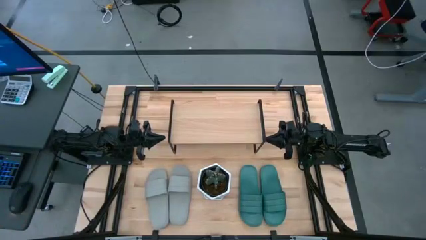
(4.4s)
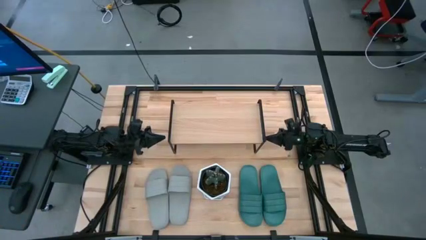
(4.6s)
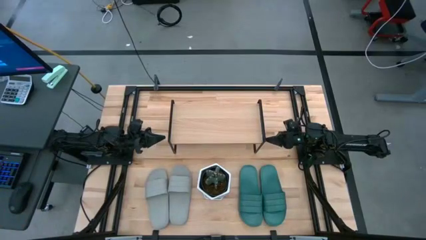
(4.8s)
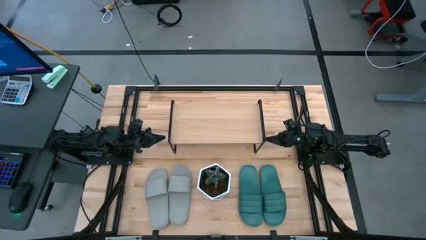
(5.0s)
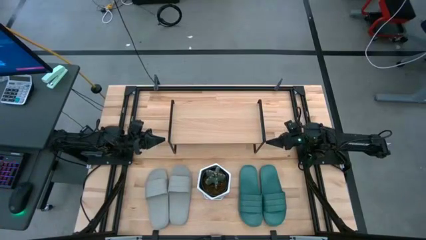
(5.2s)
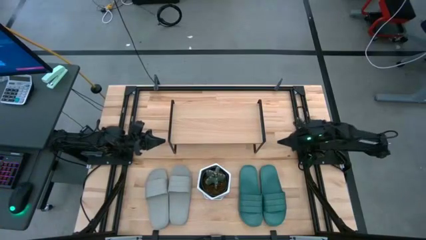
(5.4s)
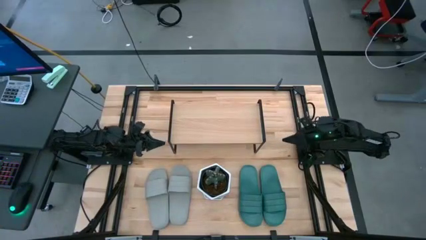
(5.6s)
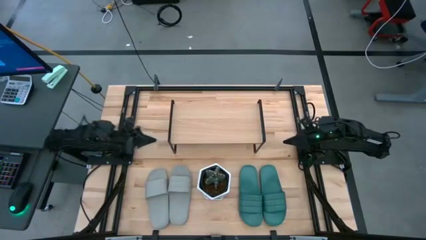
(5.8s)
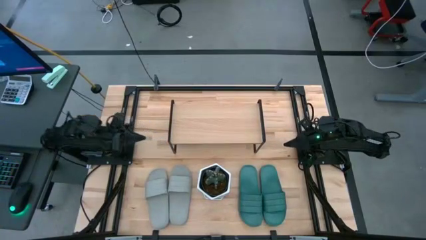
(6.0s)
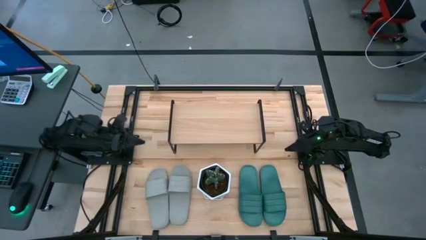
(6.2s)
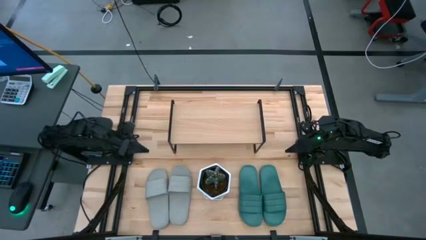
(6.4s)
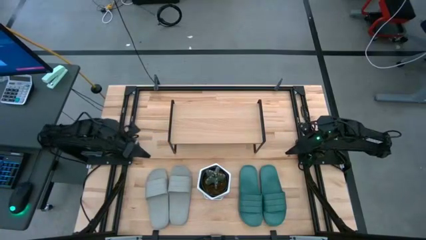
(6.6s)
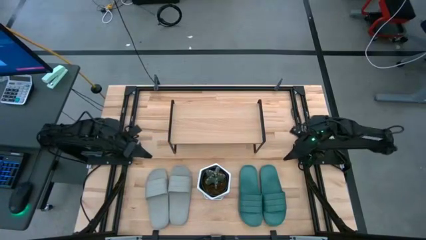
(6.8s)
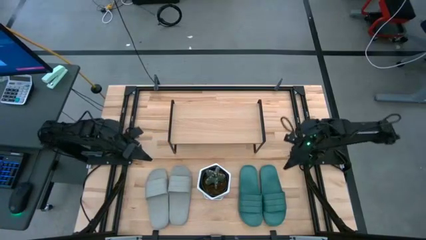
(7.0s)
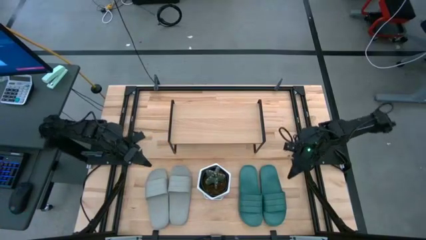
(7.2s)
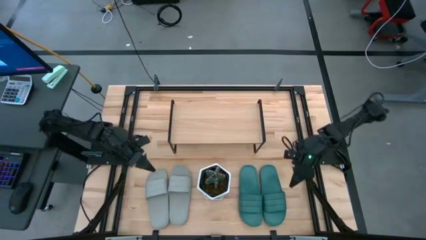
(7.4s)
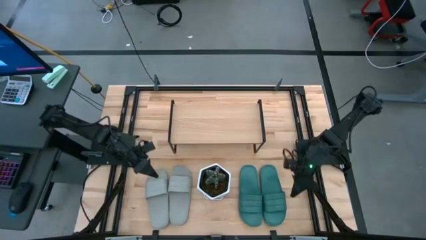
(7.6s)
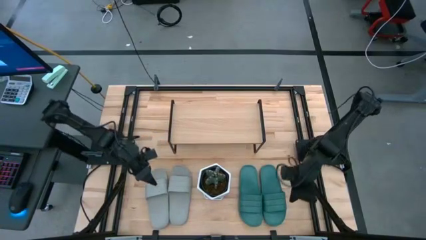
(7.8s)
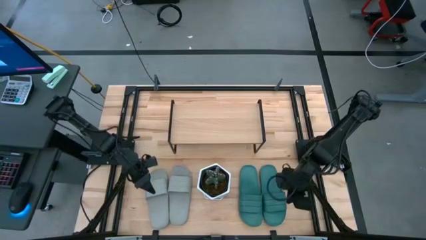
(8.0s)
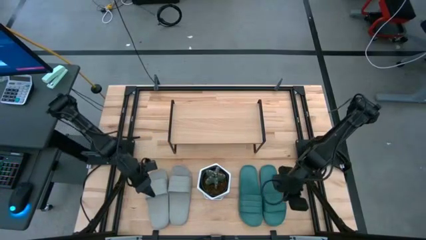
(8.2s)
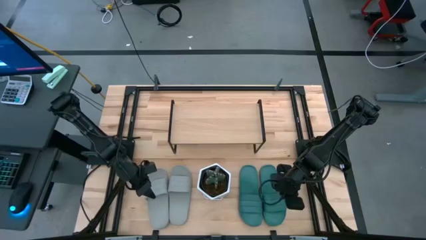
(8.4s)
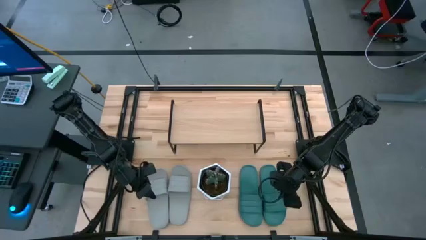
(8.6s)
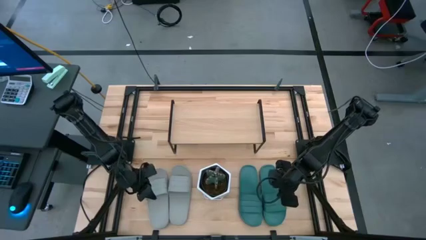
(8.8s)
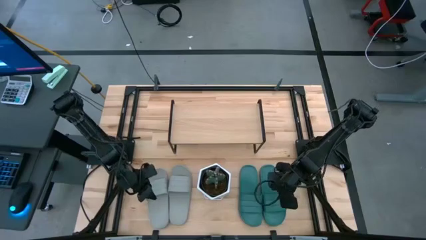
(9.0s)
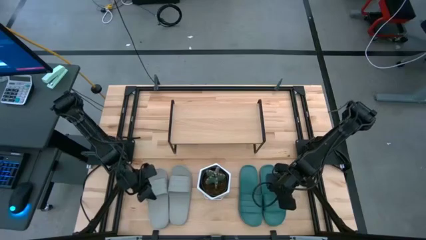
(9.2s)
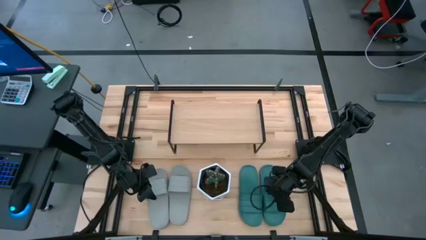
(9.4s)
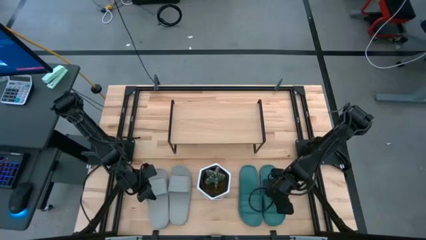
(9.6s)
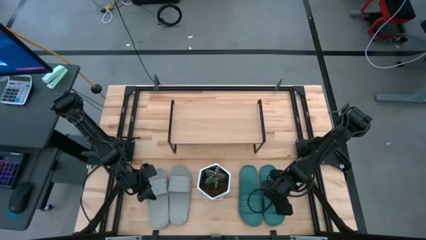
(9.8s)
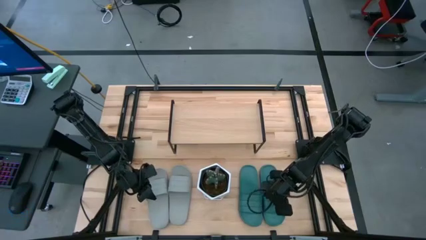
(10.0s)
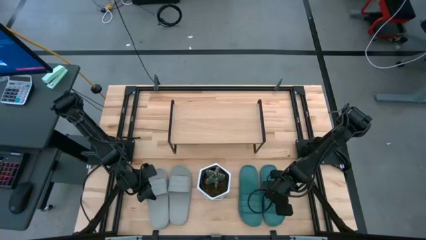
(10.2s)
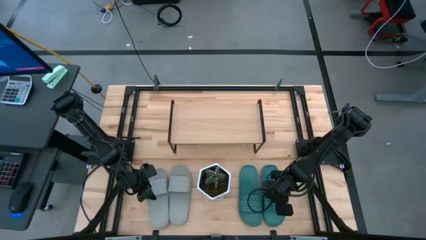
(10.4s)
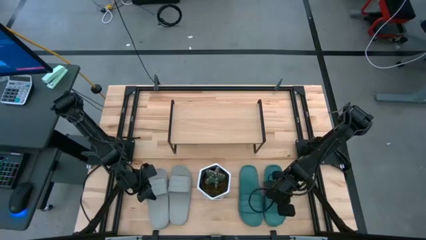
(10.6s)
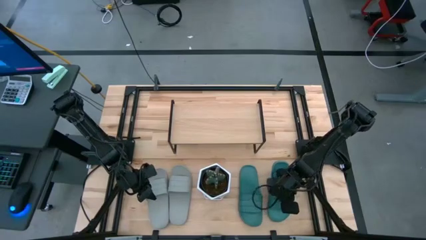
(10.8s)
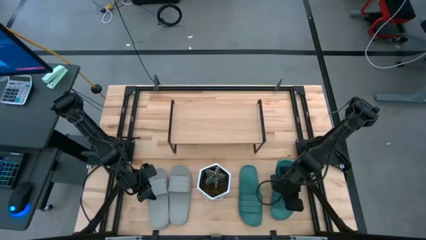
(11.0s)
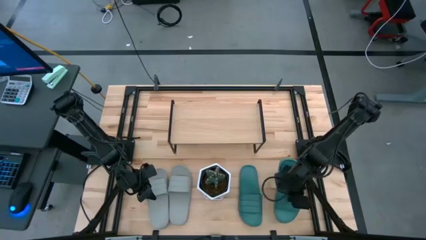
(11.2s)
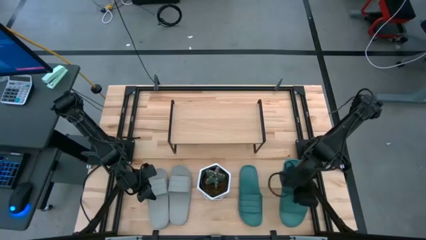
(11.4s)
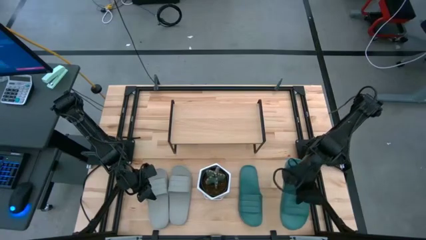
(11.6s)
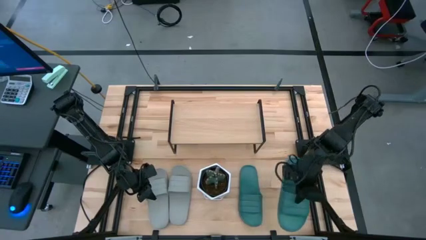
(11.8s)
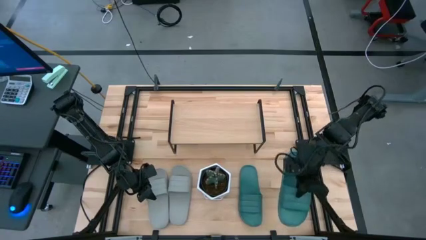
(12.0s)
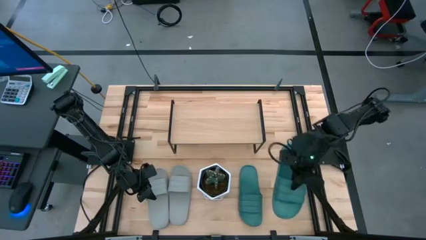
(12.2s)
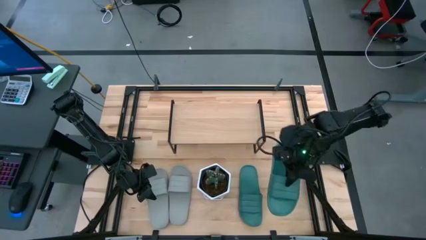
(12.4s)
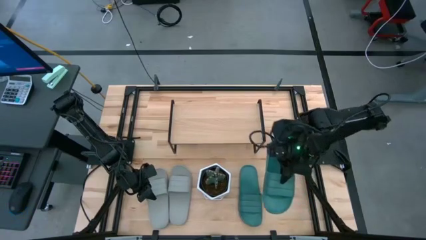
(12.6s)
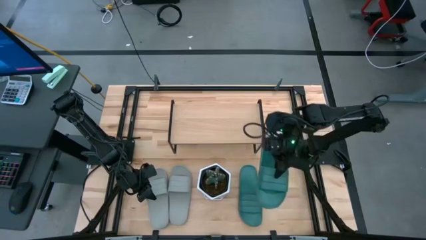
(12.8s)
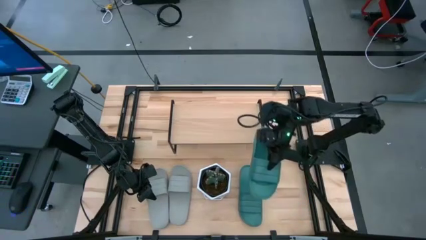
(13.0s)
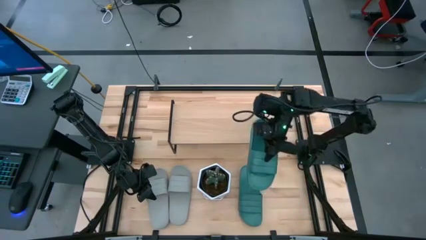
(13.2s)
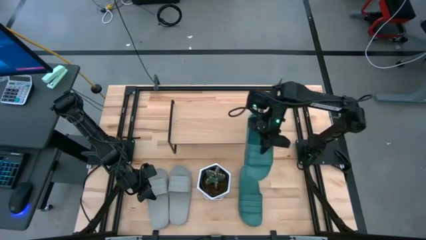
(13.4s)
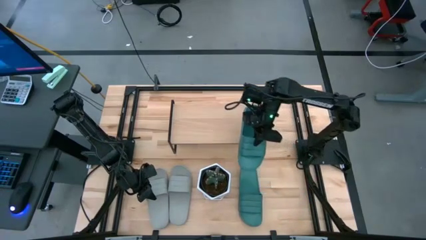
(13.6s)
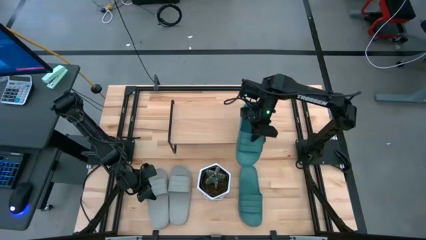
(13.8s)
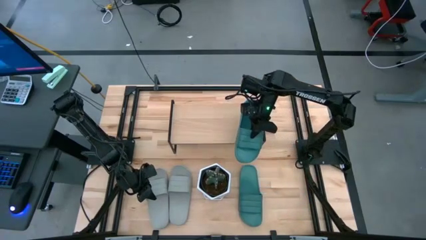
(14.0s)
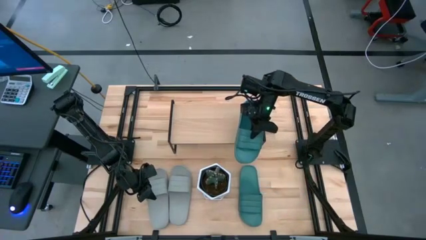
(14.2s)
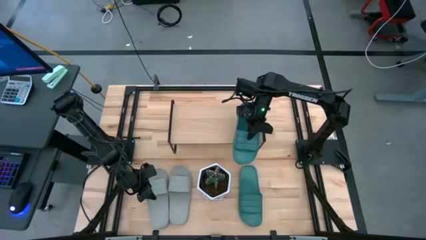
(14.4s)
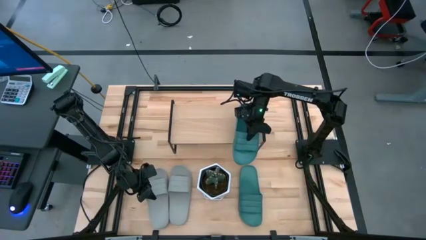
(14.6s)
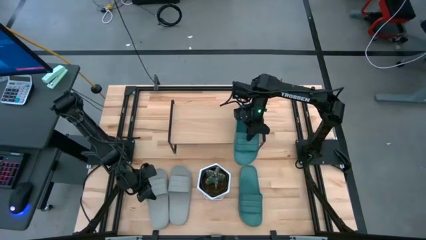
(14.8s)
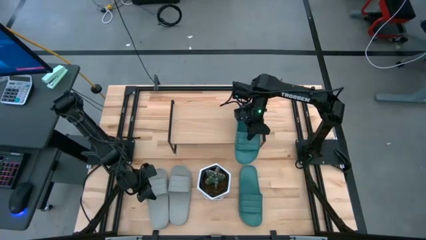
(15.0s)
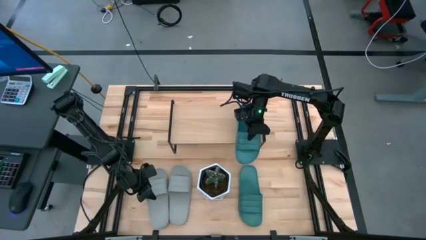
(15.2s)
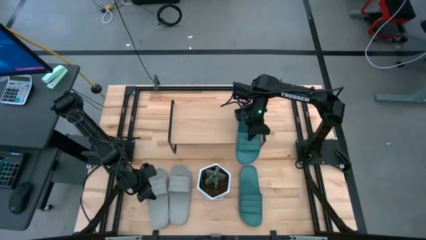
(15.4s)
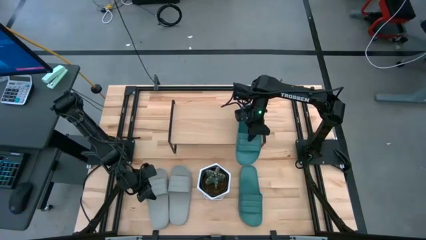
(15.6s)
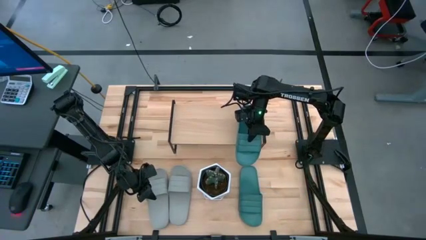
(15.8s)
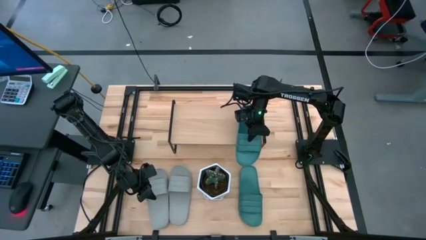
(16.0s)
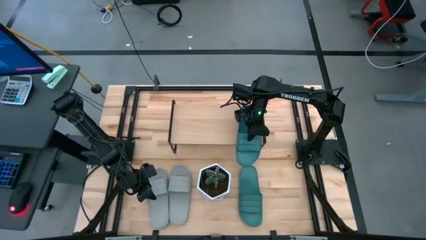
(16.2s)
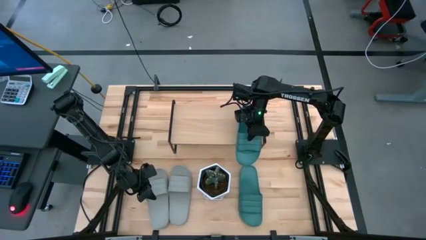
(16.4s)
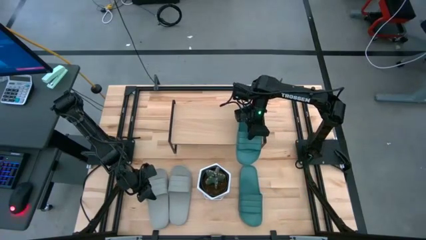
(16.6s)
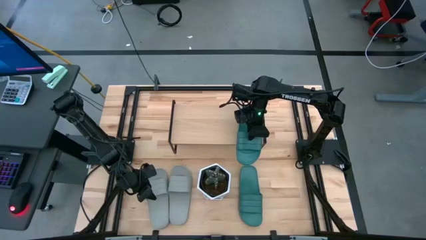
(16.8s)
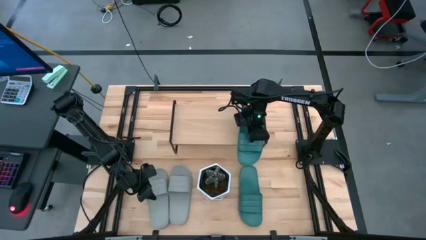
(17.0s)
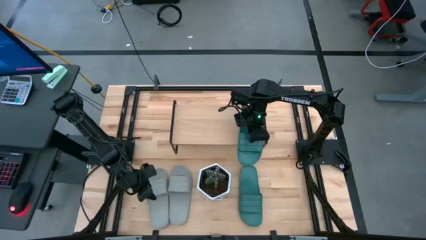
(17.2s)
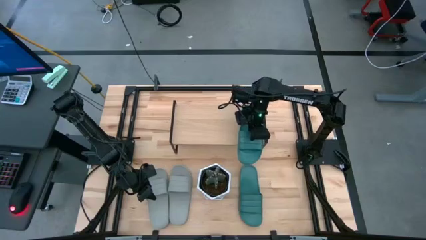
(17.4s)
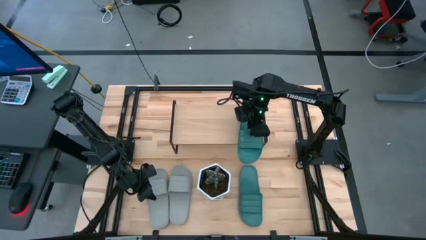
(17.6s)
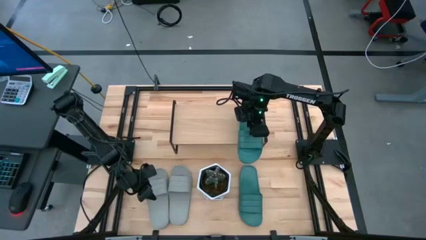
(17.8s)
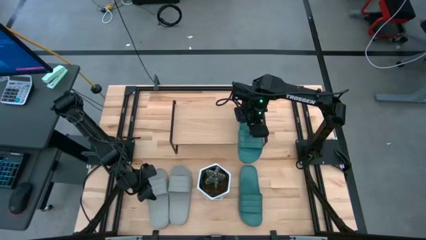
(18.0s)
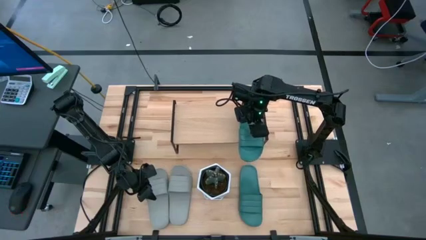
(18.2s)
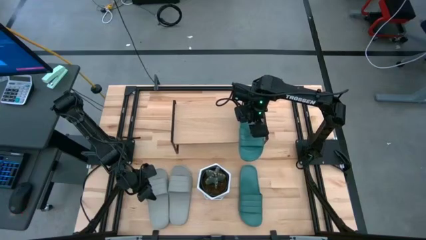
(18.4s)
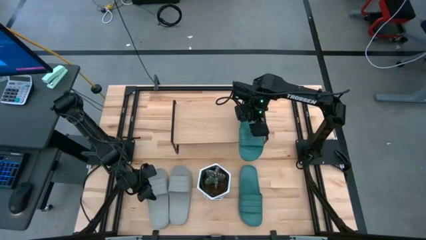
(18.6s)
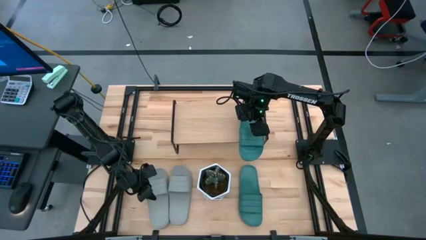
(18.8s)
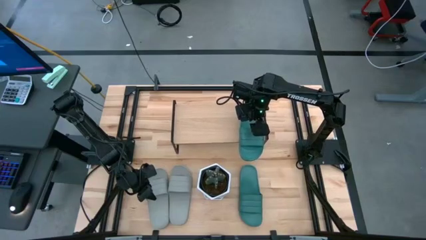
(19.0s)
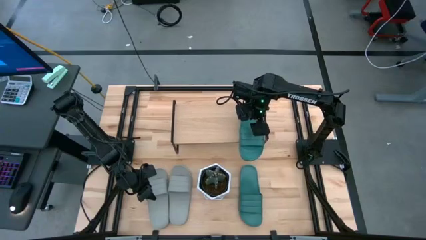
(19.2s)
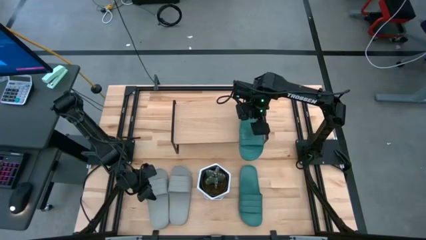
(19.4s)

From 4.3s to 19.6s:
Task: Pick and place slides into the shelf
Put the right green slide on the shelf
